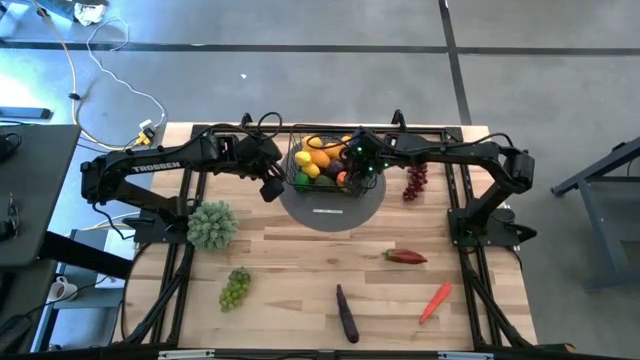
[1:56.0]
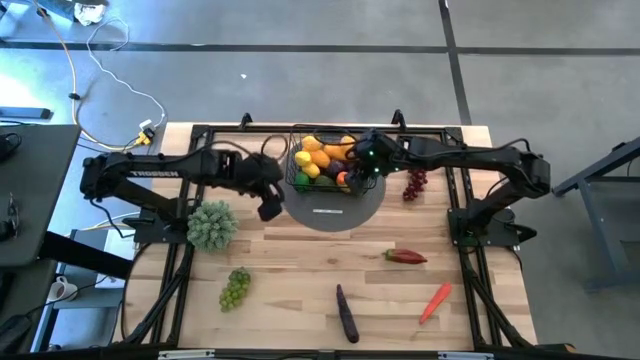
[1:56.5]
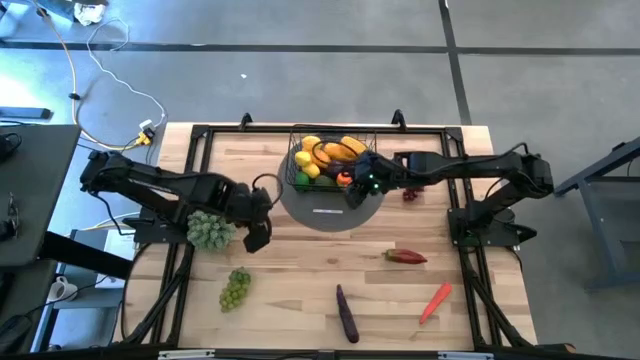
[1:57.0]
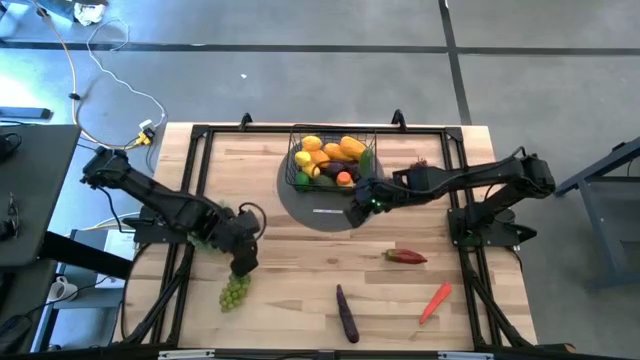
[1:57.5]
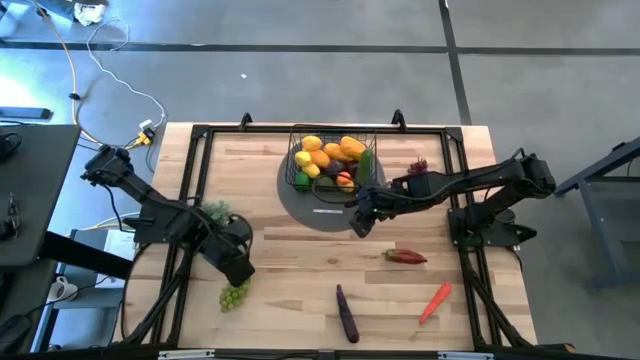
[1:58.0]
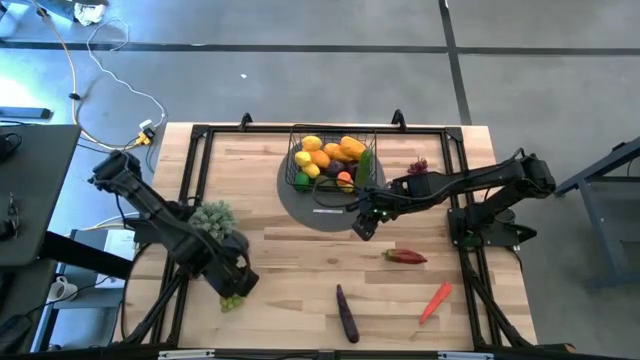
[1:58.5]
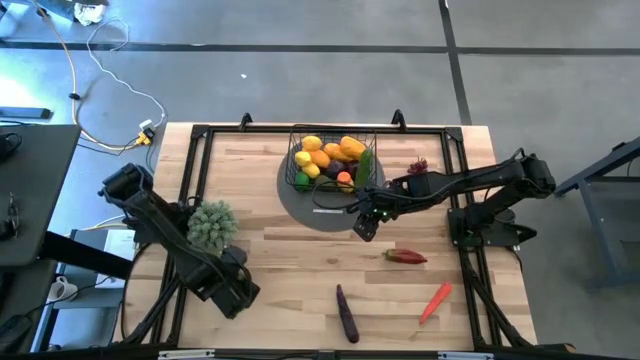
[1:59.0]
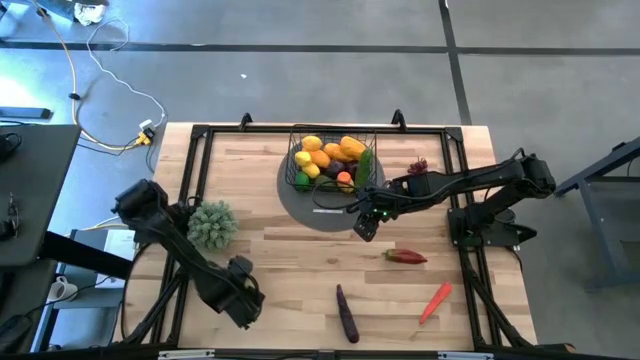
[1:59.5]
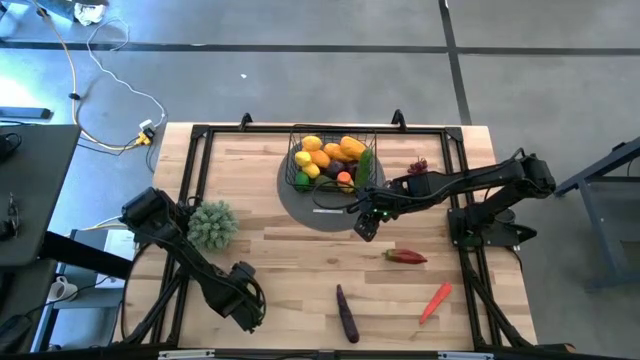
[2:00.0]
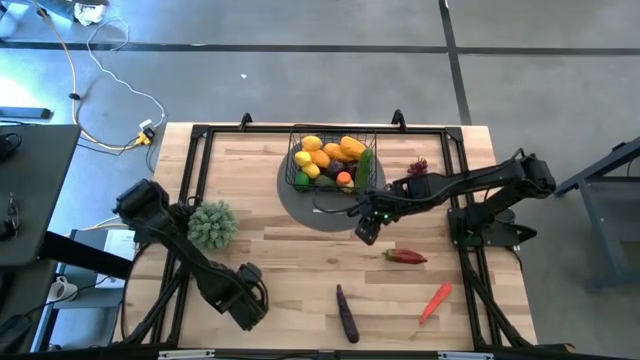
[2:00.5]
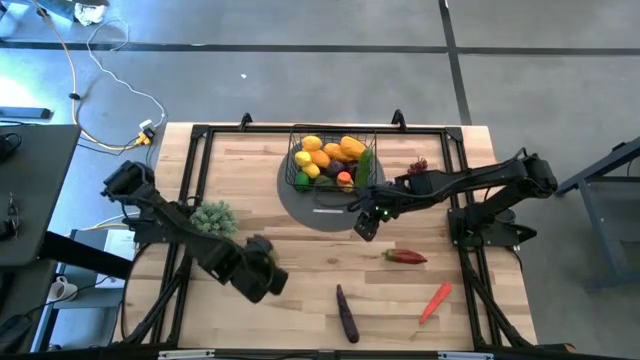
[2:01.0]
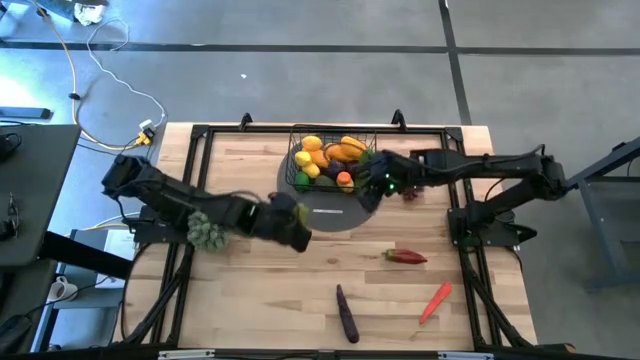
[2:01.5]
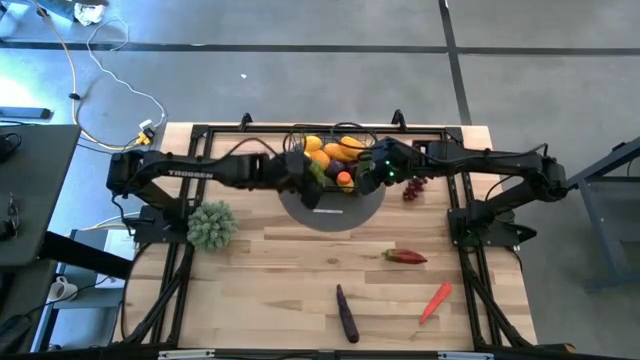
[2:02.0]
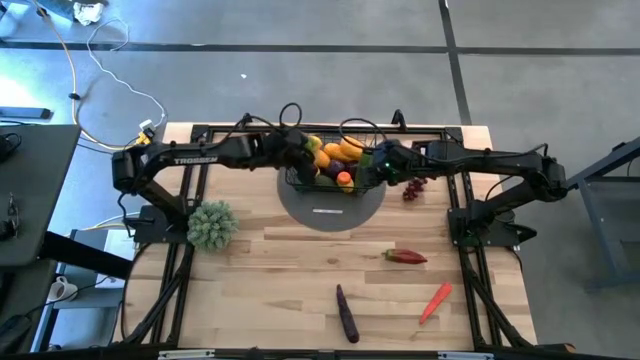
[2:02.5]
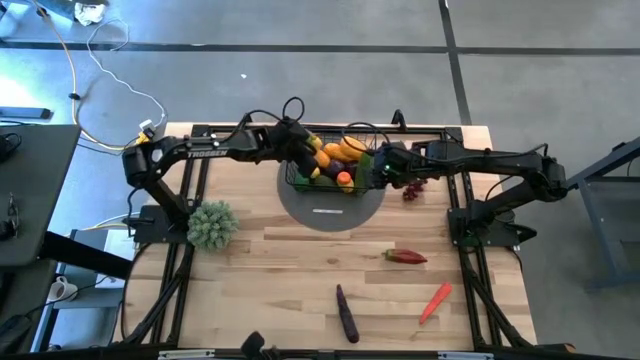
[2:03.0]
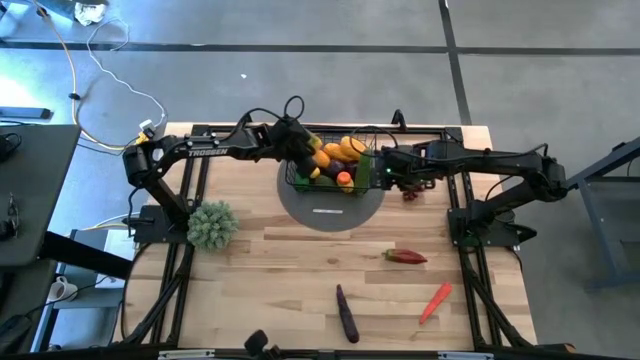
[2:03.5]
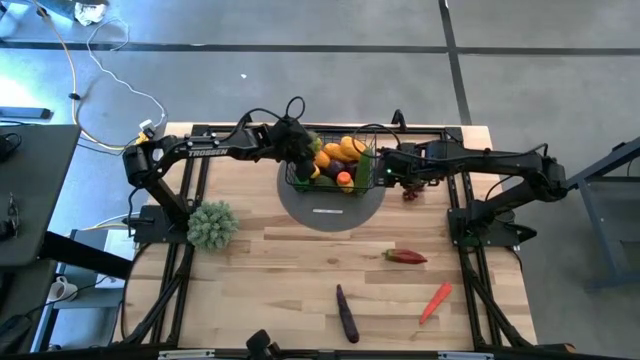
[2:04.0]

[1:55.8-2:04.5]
Task: Build produce basket
Put the green grapes into the wire basket

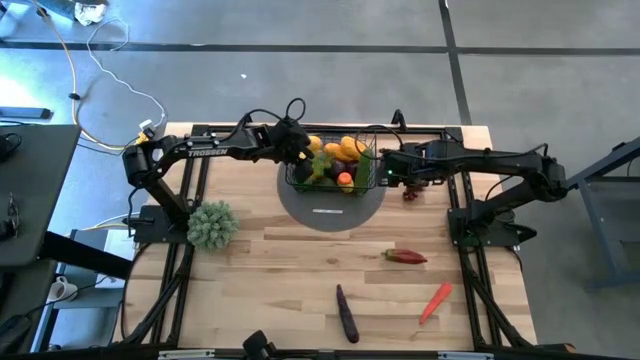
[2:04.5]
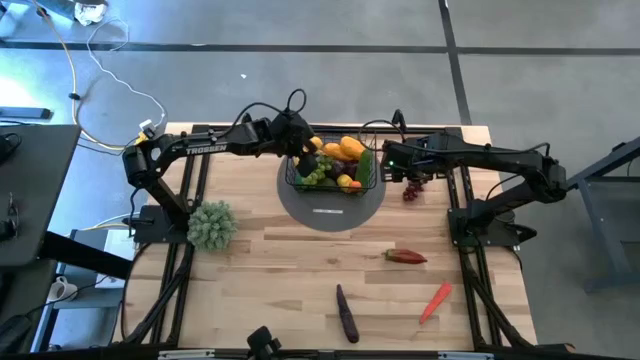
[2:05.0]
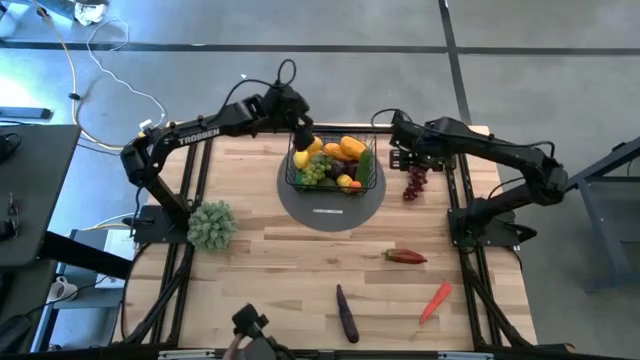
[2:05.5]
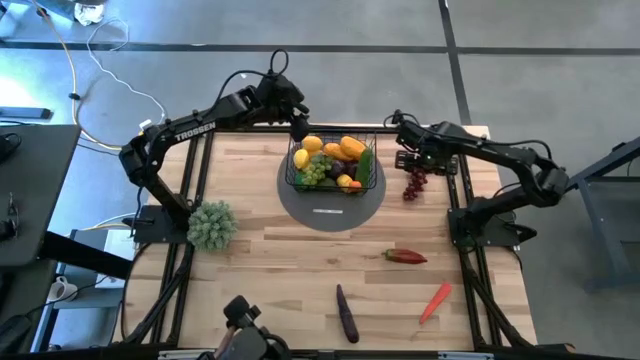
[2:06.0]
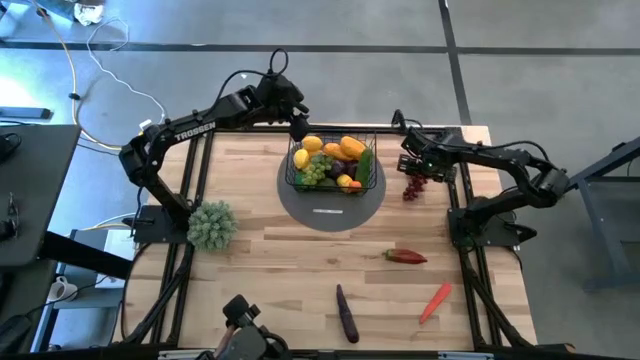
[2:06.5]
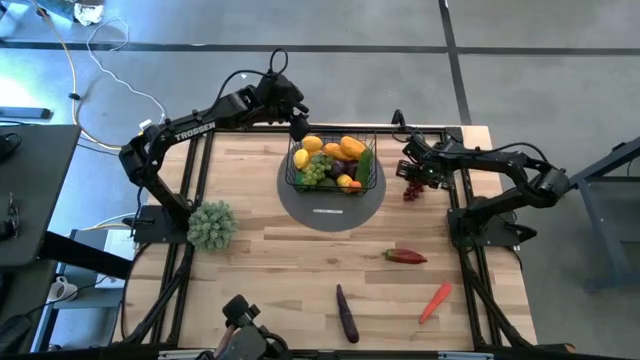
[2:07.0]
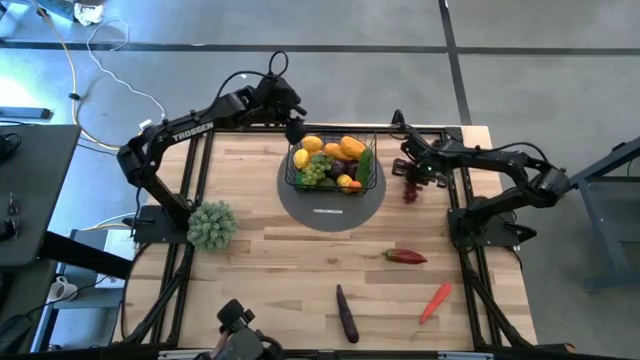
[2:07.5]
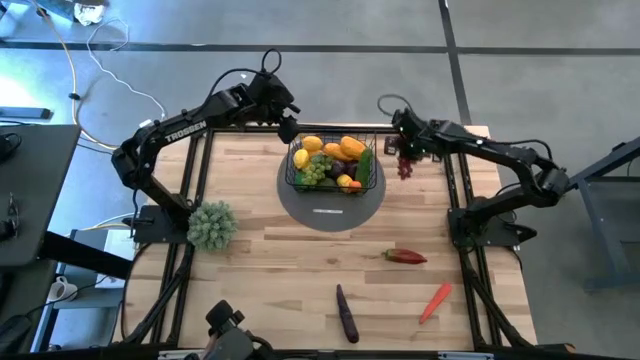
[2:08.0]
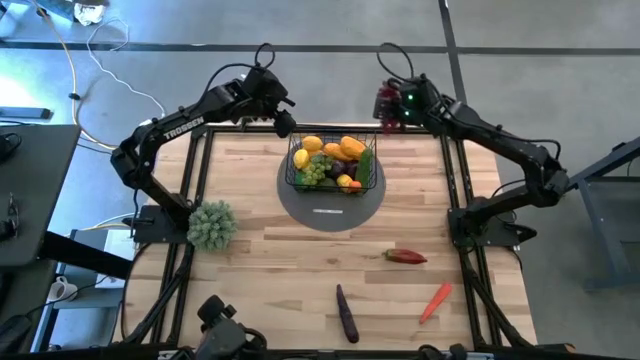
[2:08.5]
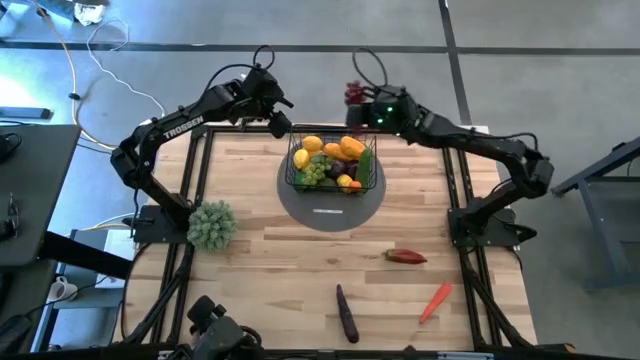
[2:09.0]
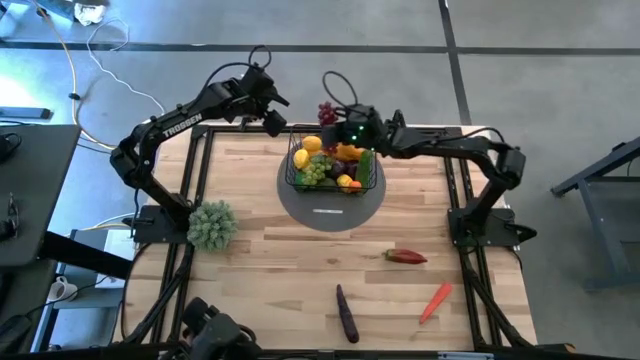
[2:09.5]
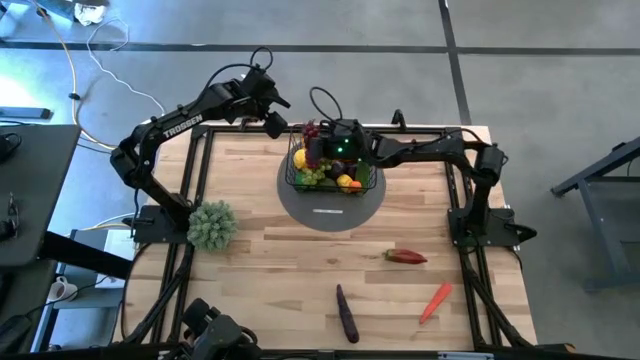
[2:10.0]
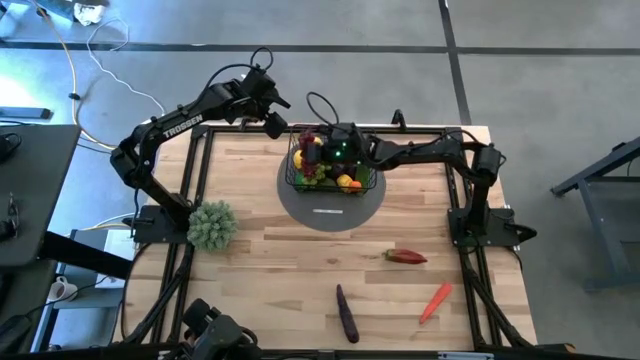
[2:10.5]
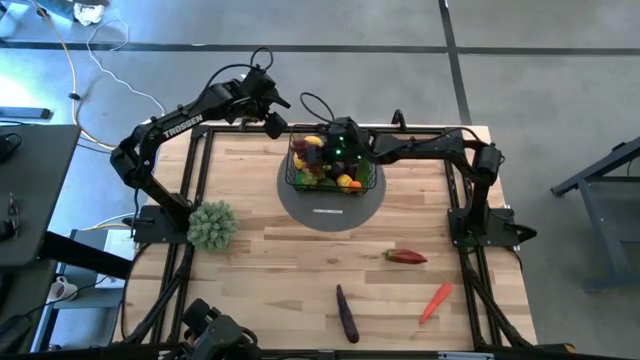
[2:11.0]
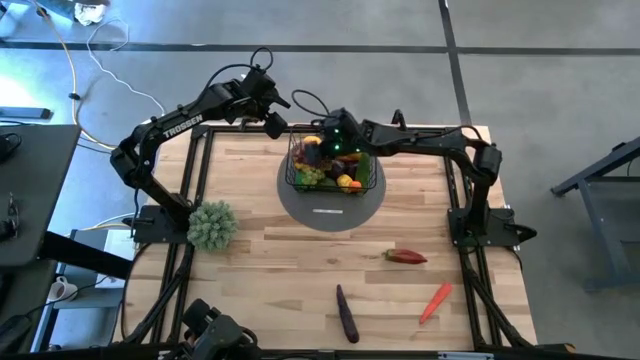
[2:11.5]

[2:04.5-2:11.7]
Put the violet grapes into the wire basket

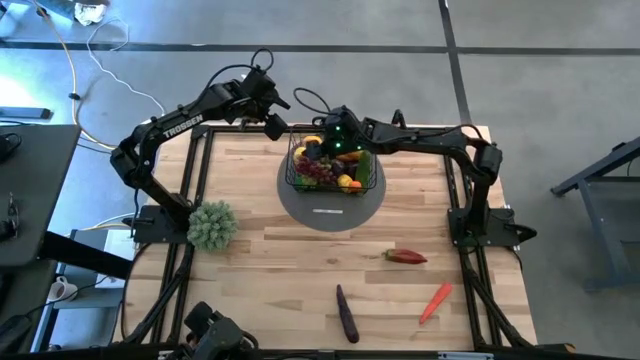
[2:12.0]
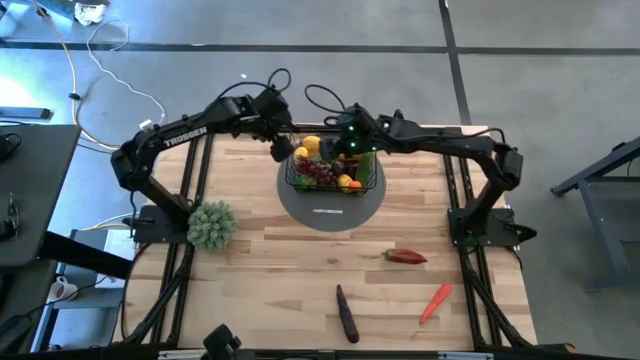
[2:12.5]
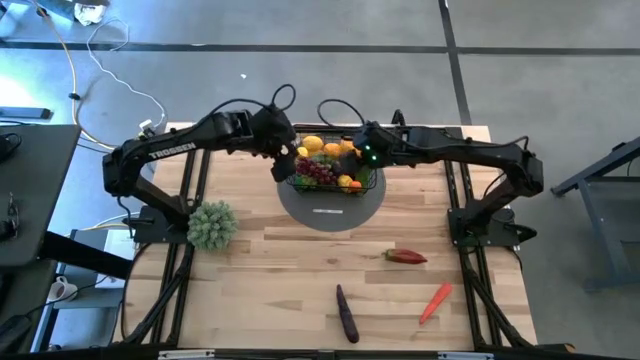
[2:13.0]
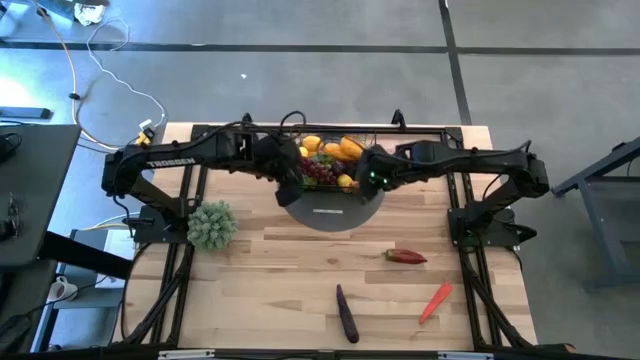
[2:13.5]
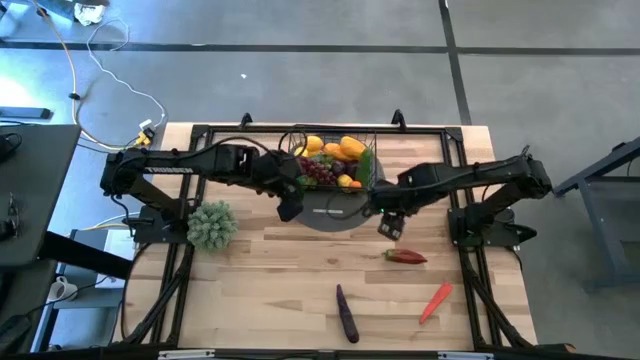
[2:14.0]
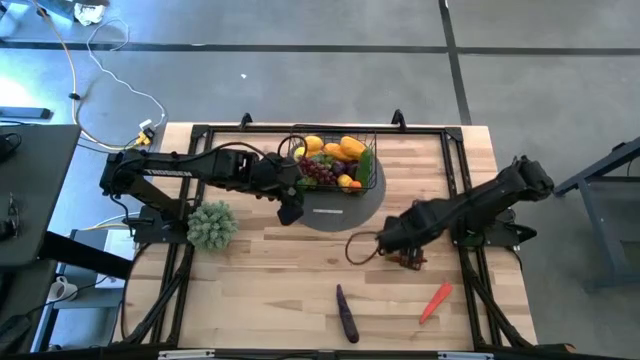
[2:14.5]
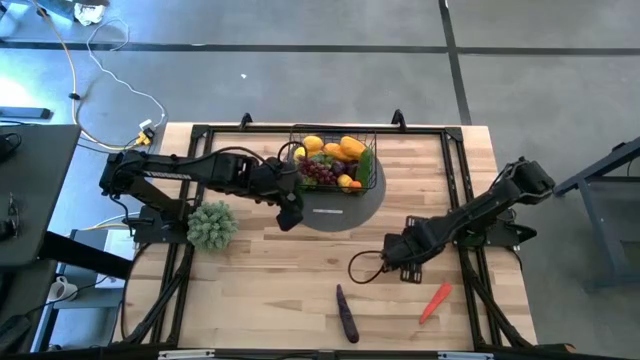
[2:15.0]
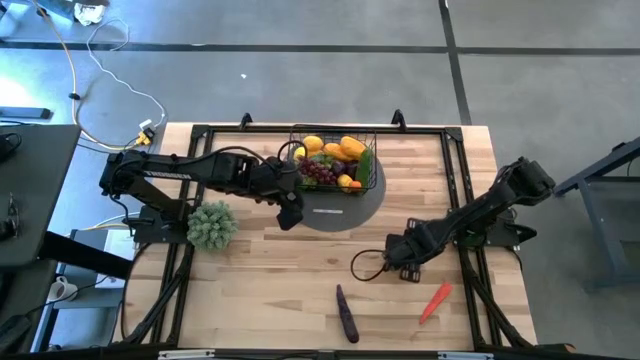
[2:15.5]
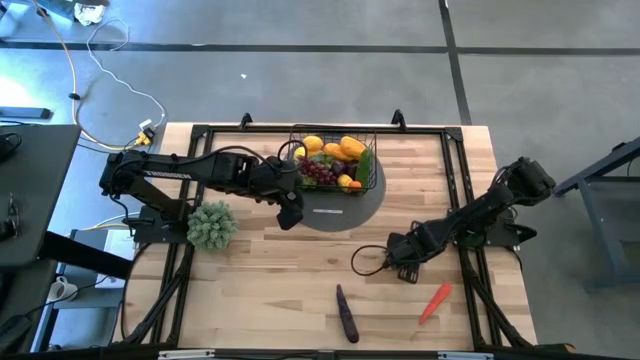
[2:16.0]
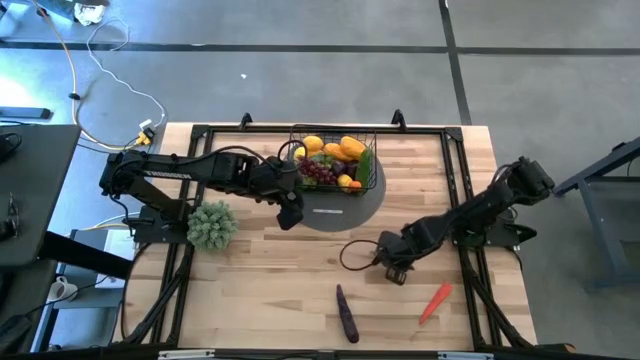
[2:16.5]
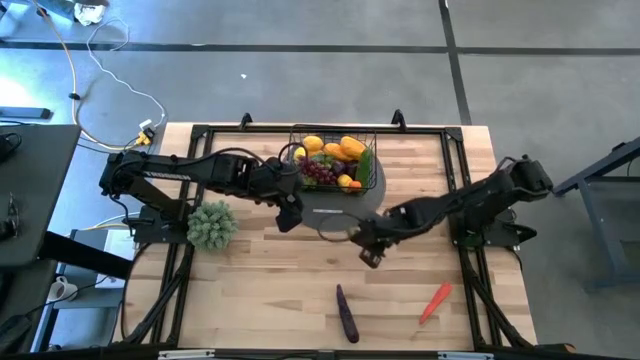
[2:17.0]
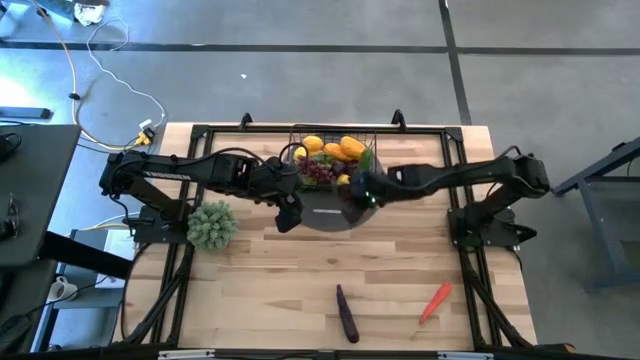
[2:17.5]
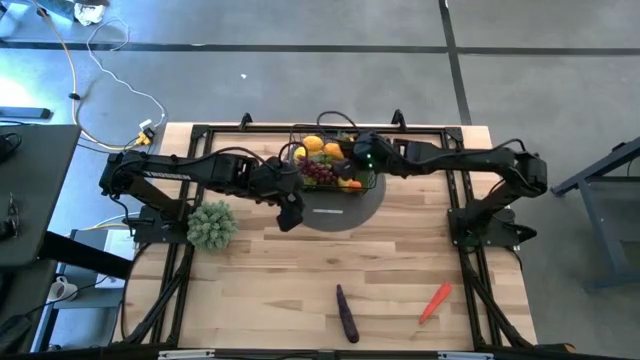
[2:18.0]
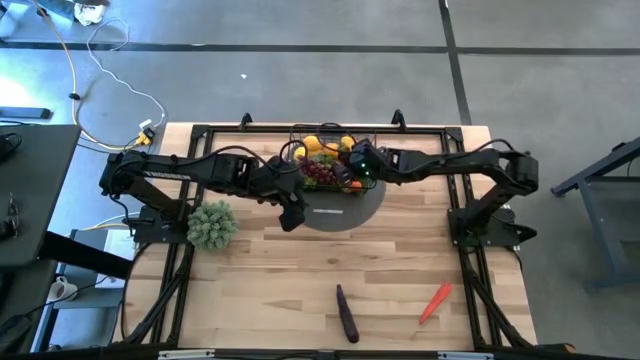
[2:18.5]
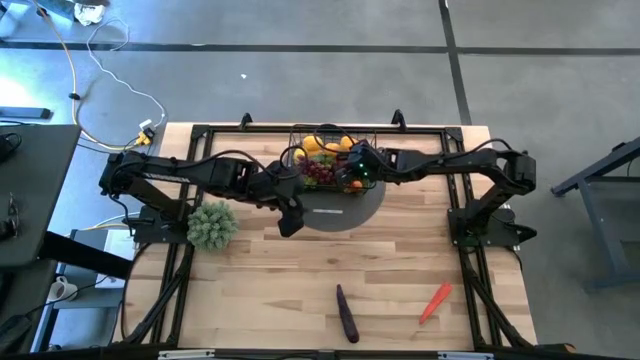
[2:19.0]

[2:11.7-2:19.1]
Put the red chili pepper into the wire basket
